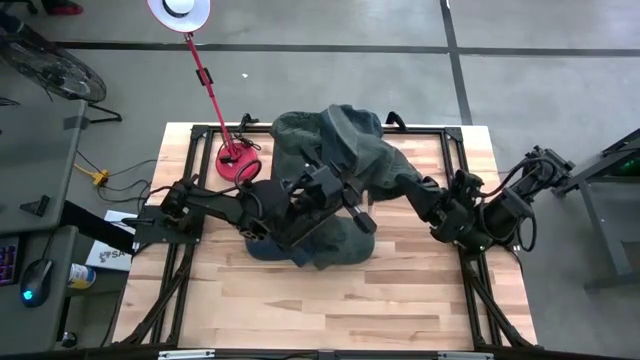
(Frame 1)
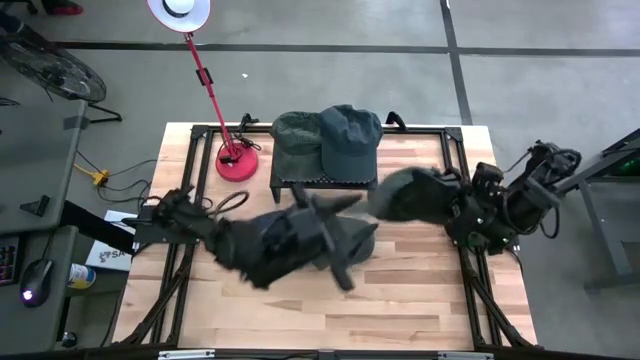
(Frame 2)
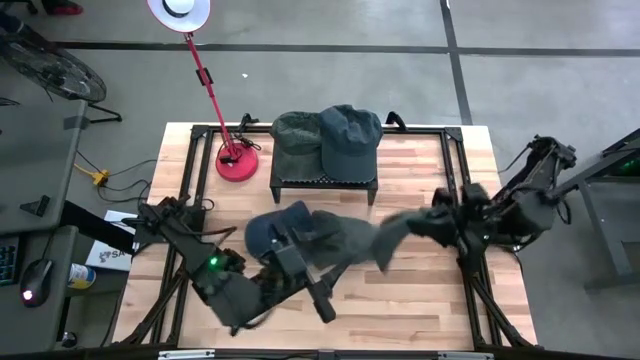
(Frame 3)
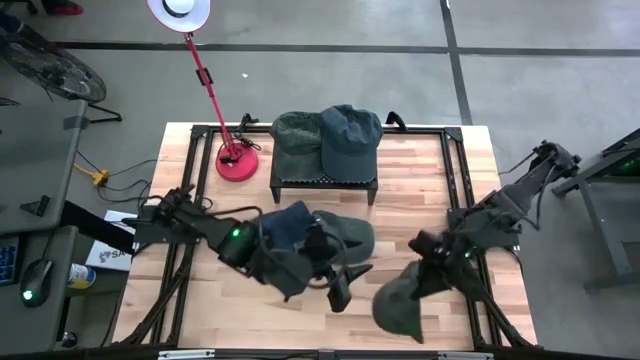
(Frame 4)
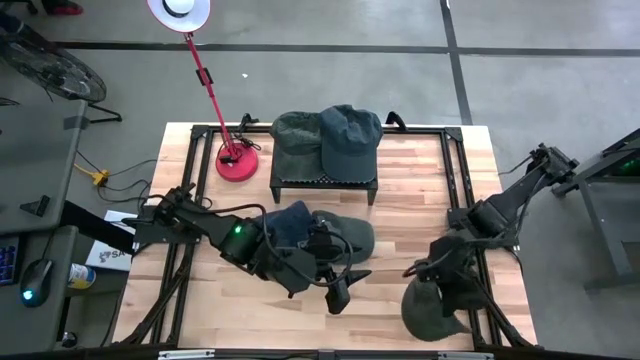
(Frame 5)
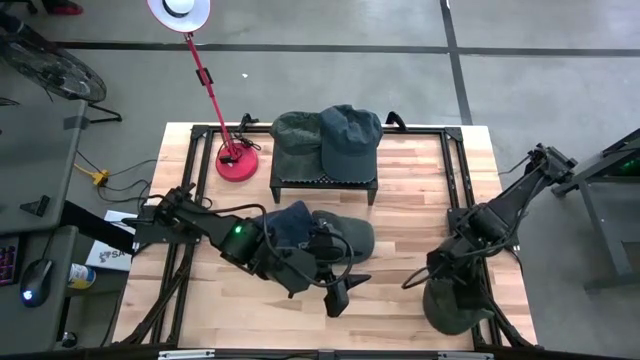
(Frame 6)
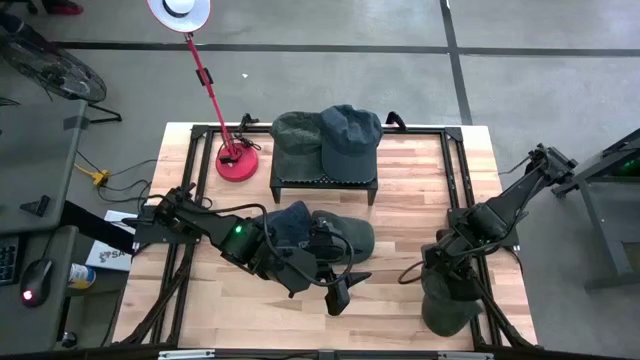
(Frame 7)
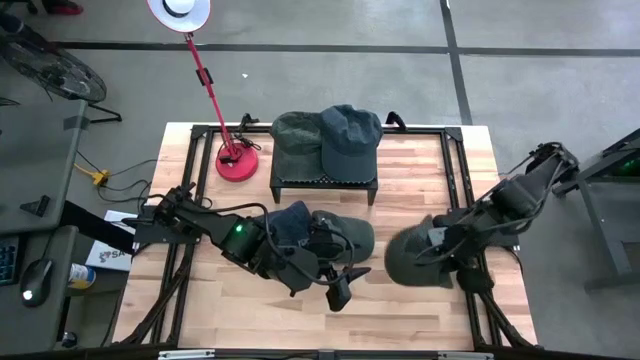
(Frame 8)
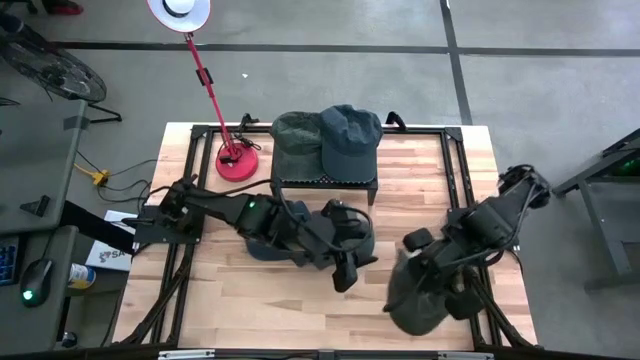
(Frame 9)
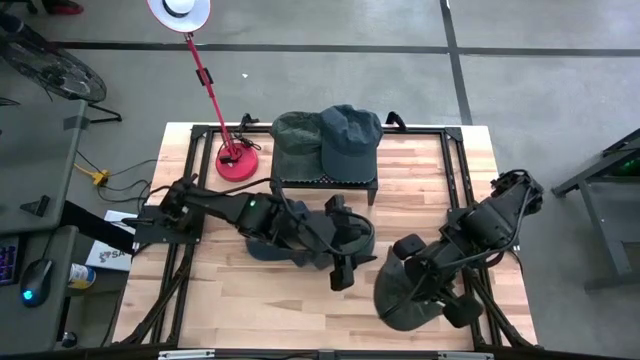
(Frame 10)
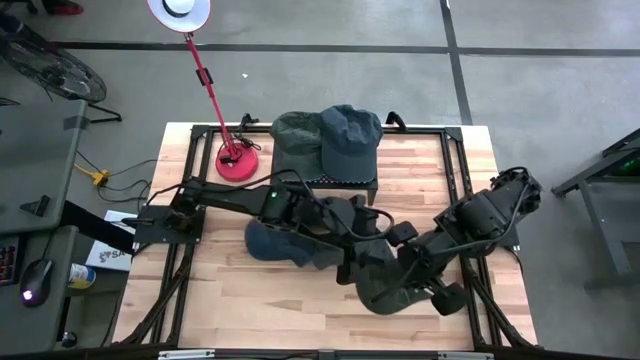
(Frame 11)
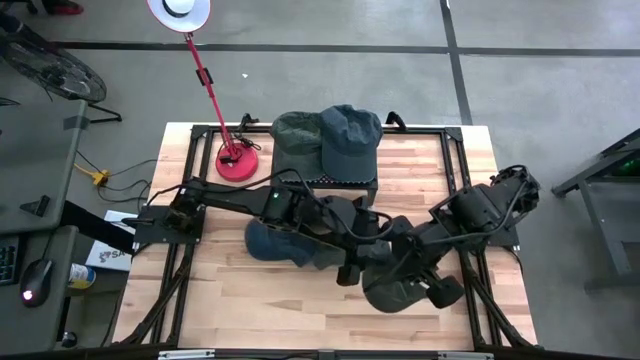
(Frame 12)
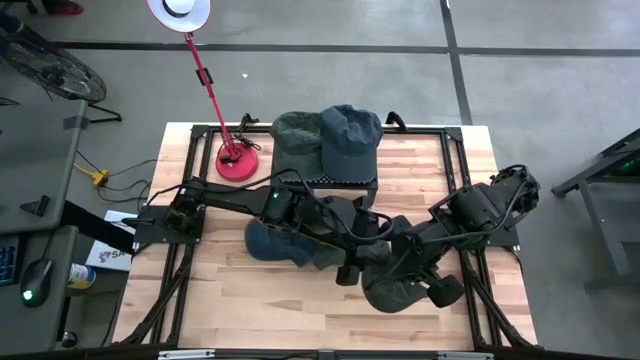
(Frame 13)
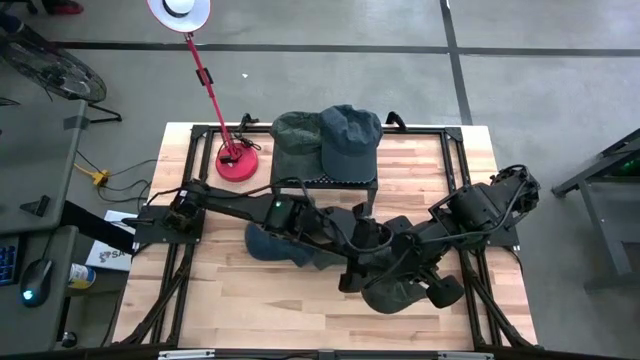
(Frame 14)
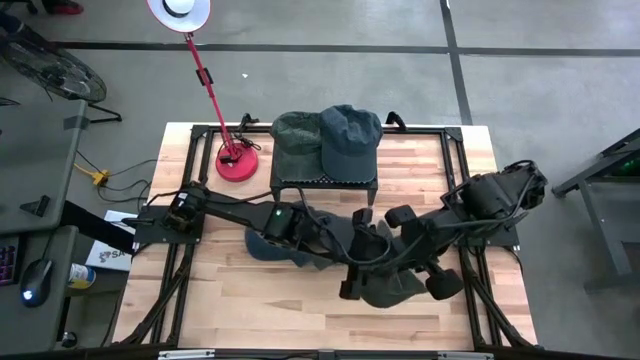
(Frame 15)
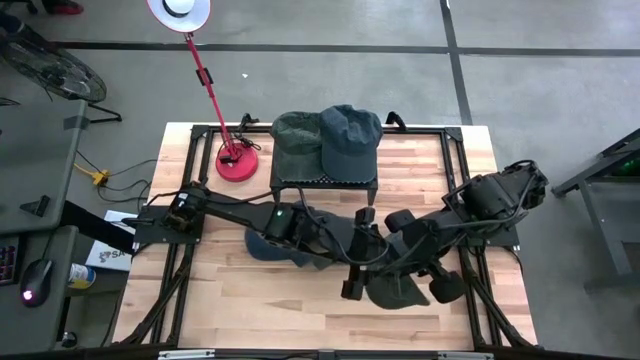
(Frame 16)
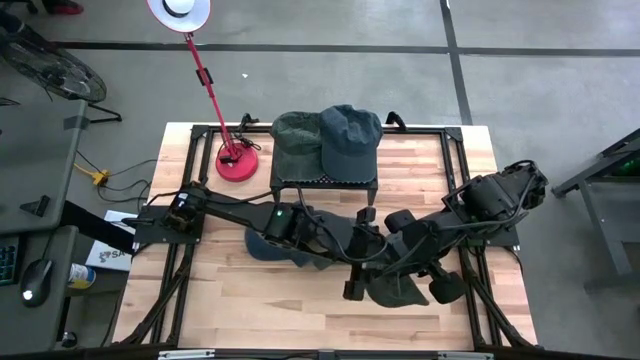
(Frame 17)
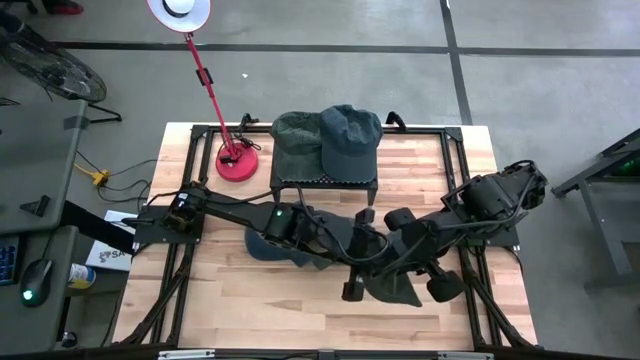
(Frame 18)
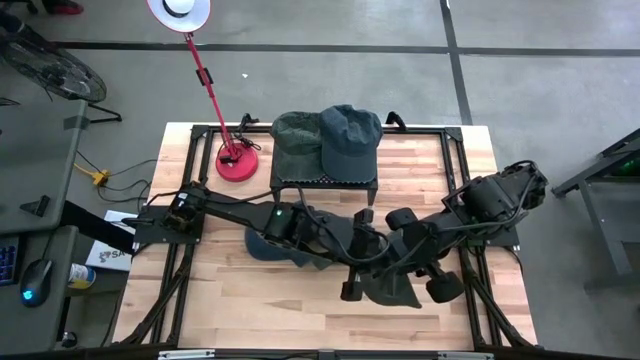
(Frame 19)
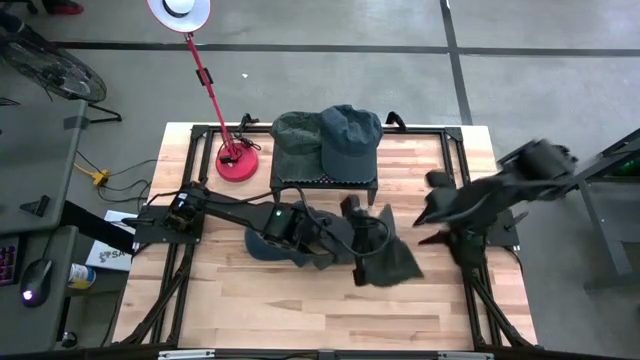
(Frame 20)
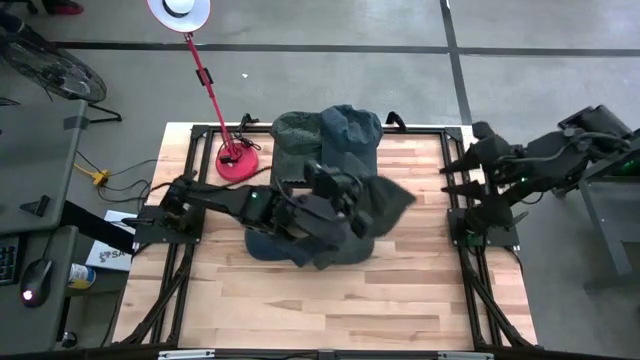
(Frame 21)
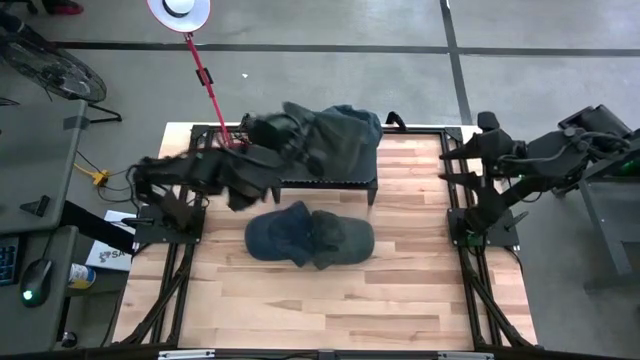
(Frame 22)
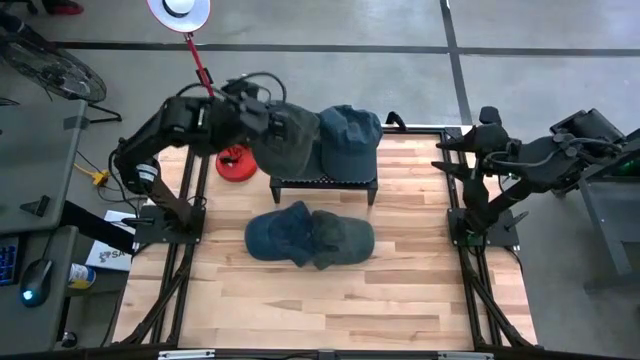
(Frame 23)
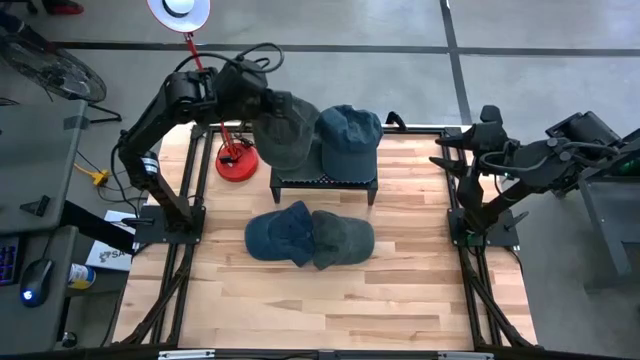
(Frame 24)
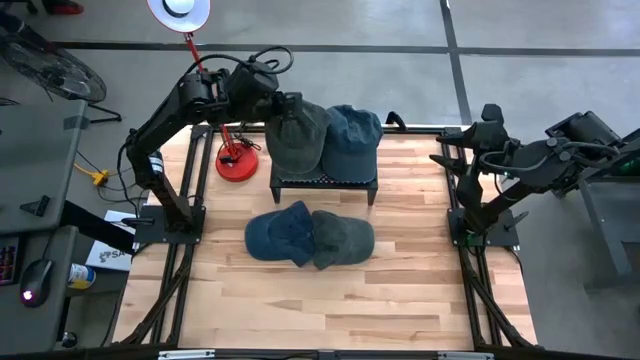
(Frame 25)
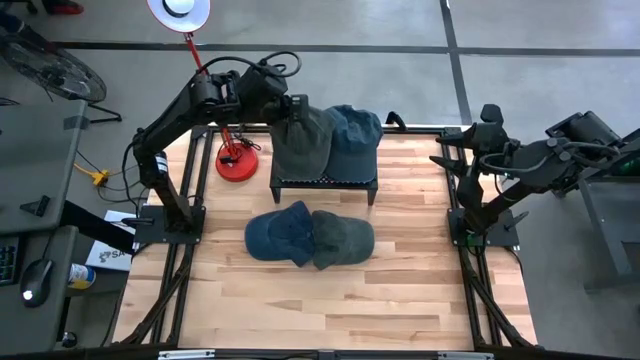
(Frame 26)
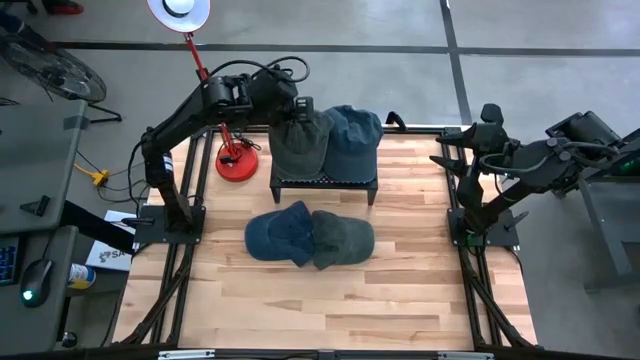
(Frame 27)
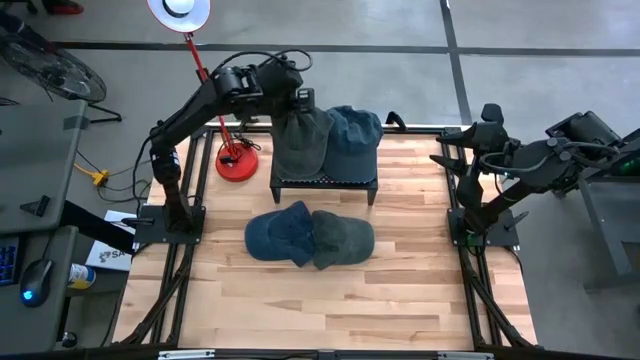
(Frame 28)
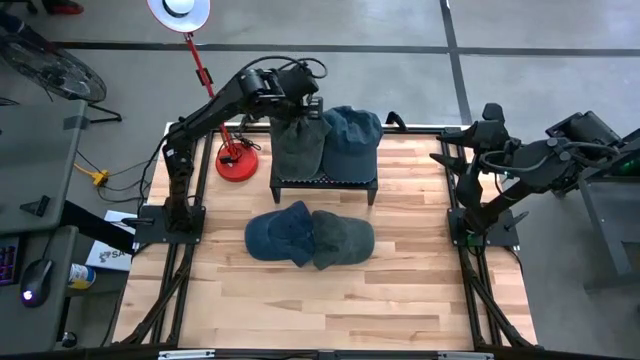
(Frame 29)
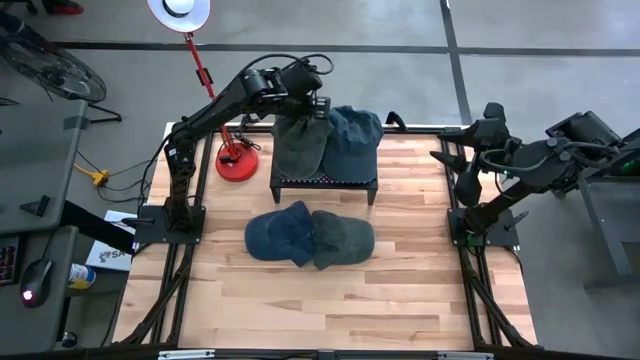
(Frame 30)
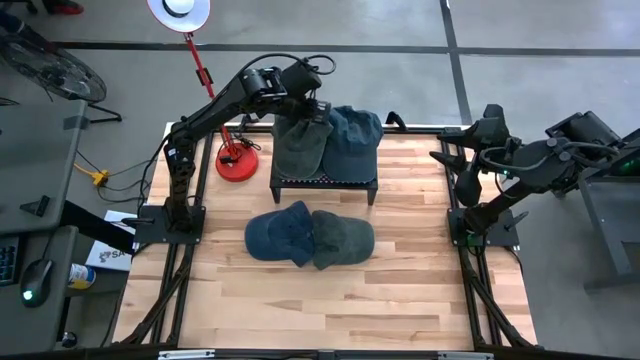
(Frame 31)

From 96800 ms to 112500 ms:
Task: Pick & Place hat
Stack the bottom gray cap on top of the other gray cap on the shelf

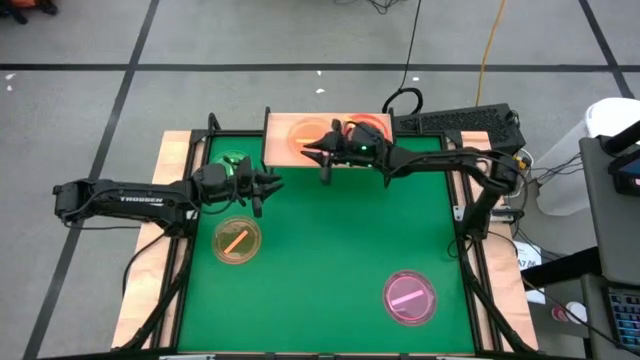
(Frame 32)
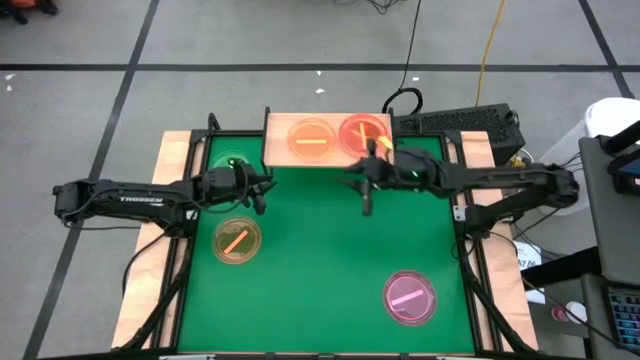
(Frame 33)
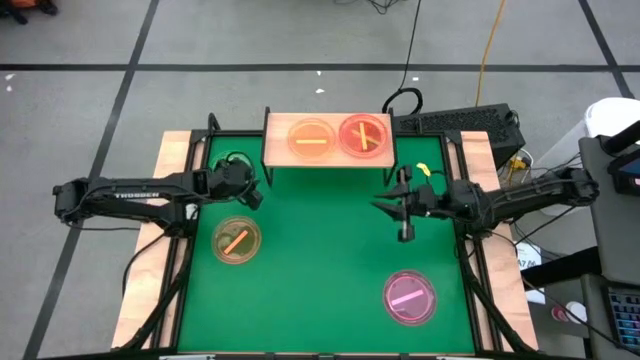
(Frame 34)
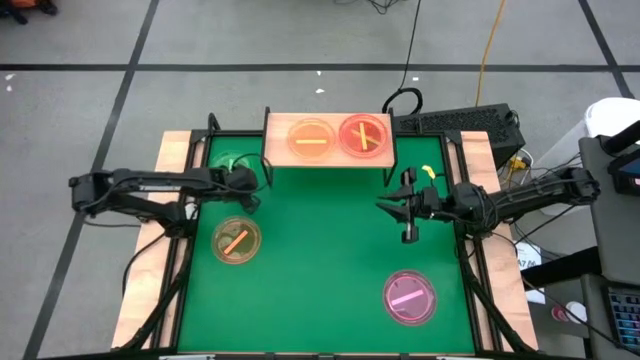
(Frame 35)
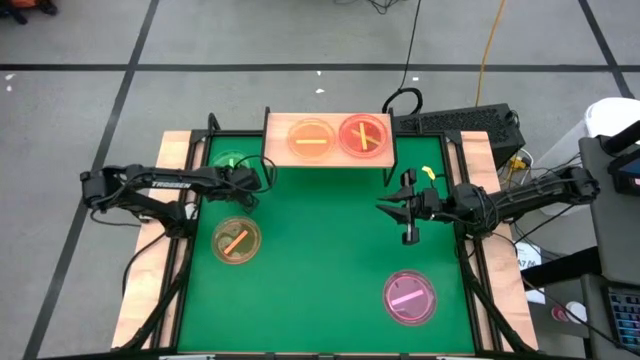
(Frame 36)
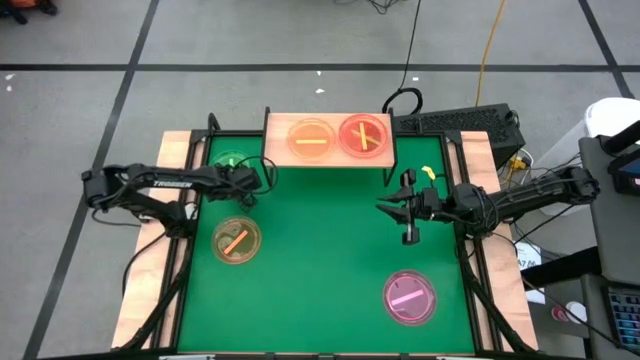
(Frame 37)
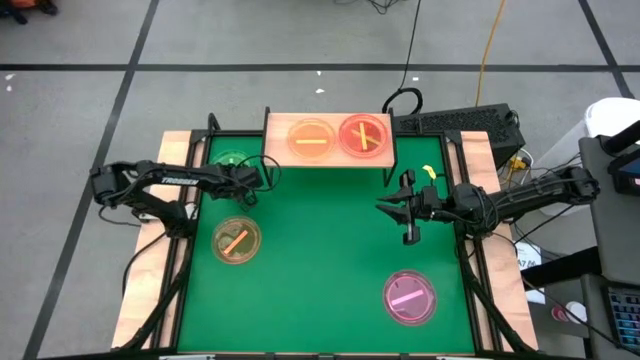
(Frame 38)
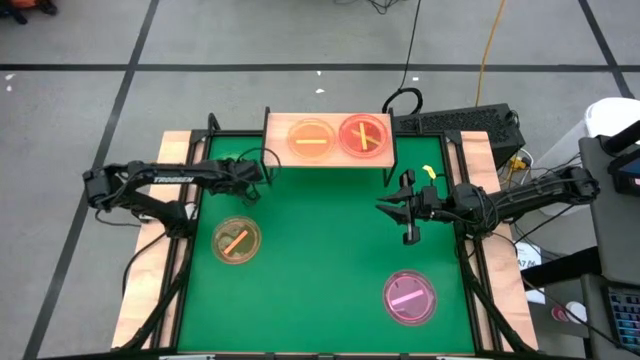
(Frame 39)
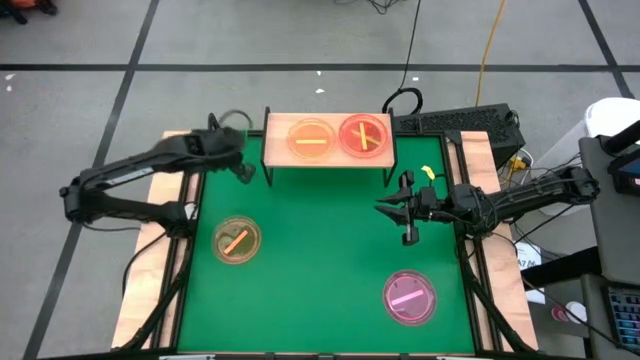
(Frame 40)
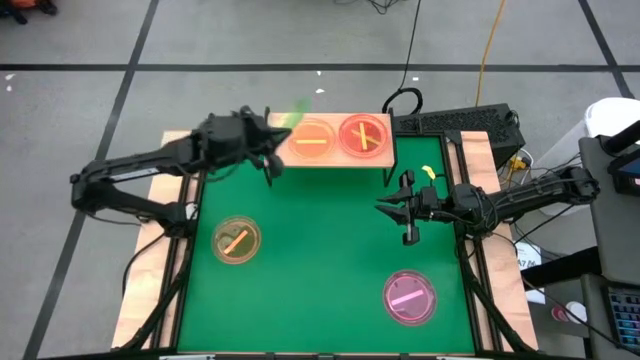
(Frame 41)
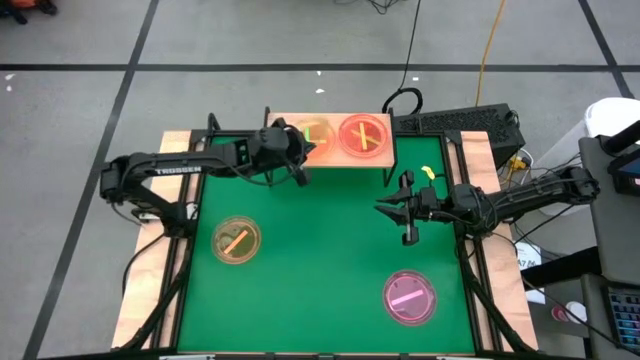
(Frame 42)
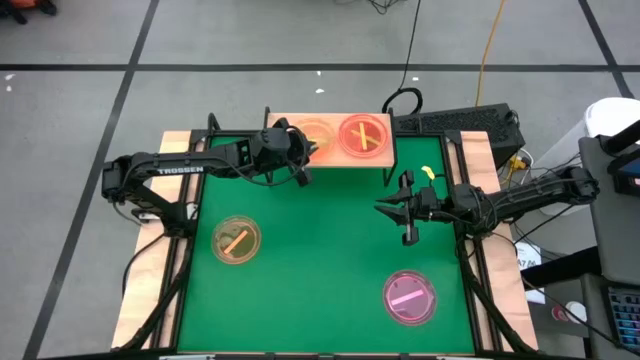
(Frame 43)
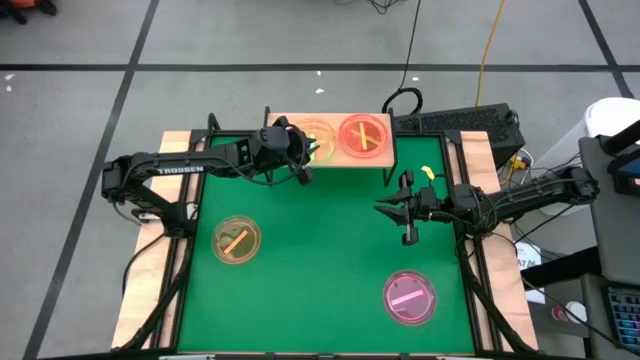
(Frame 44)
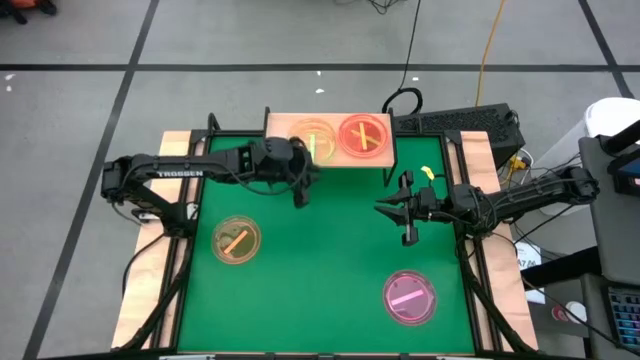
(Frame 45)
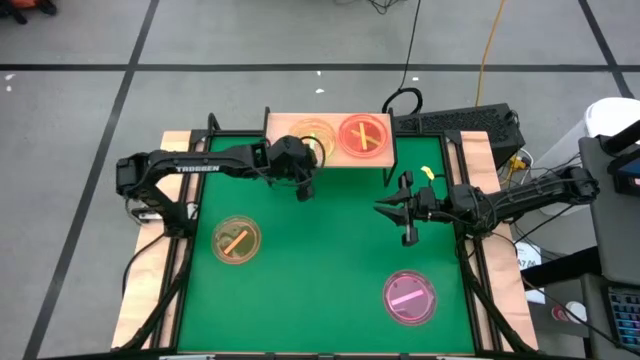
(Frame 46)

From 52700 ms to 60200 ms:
Task: Place and stack plates onto a shelf
Stack the green plate on top of the orange plate on the shelf
